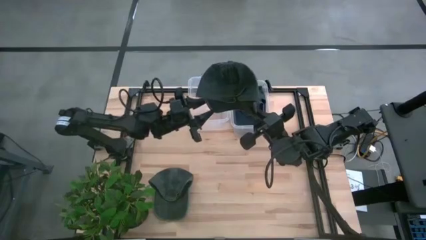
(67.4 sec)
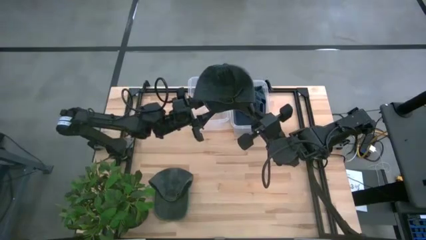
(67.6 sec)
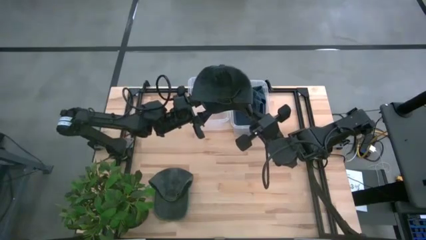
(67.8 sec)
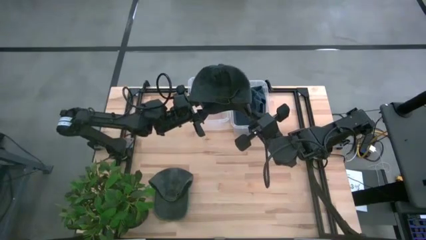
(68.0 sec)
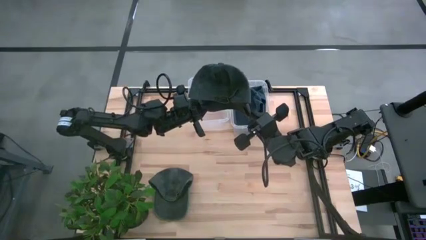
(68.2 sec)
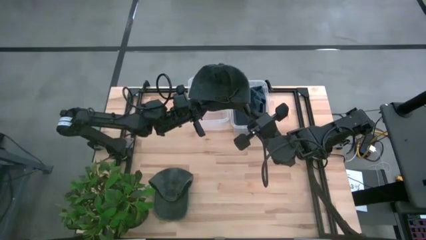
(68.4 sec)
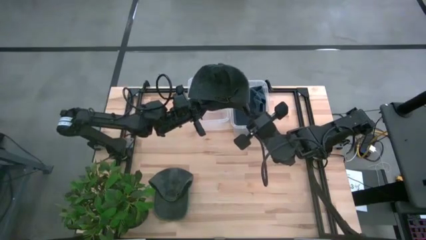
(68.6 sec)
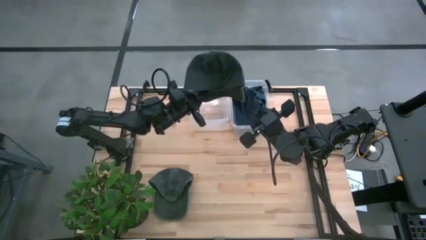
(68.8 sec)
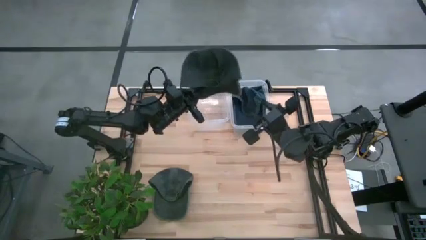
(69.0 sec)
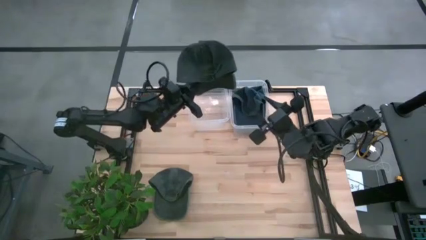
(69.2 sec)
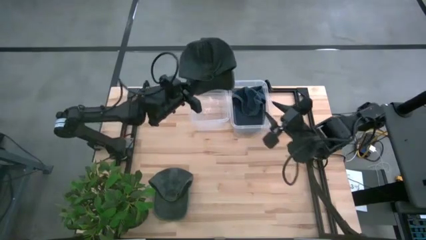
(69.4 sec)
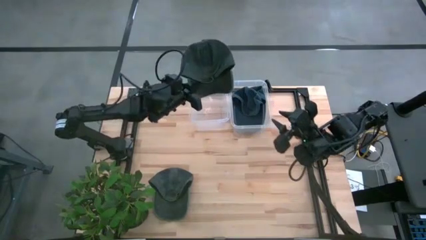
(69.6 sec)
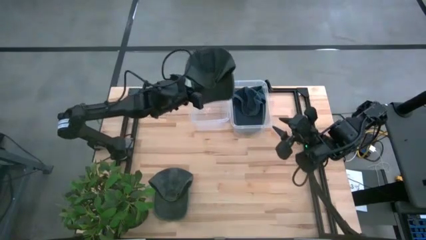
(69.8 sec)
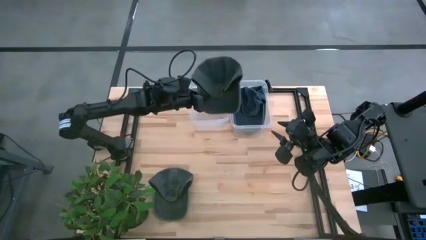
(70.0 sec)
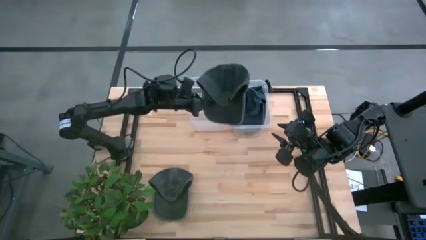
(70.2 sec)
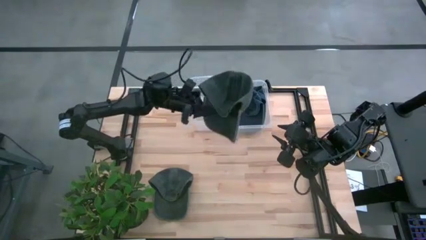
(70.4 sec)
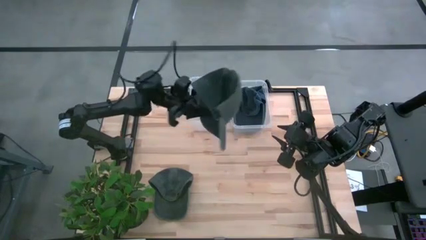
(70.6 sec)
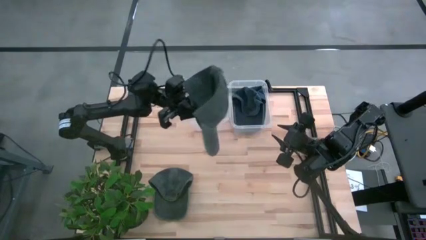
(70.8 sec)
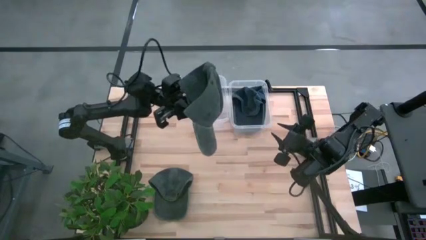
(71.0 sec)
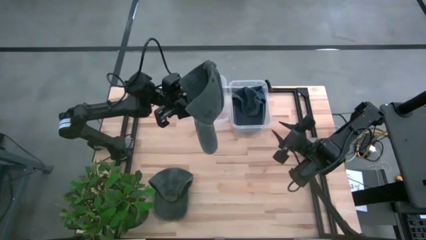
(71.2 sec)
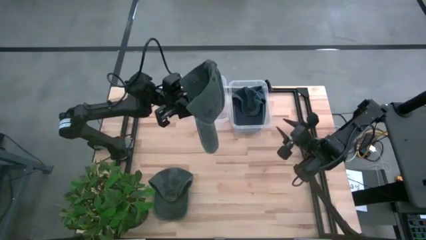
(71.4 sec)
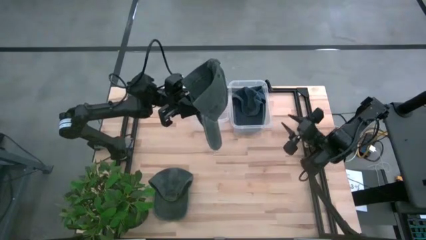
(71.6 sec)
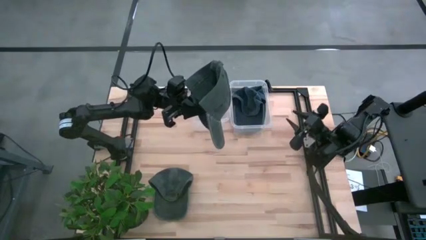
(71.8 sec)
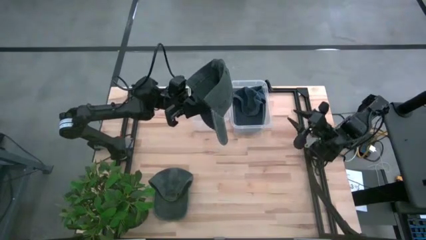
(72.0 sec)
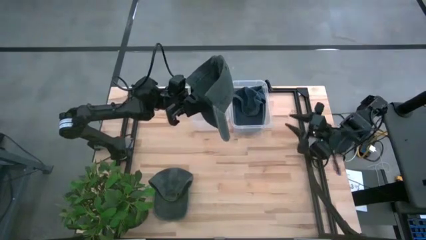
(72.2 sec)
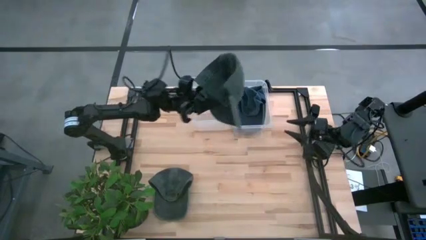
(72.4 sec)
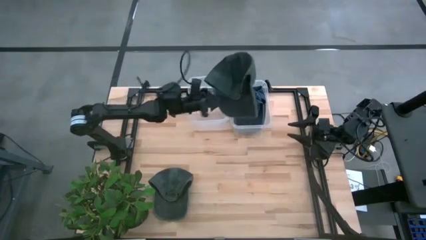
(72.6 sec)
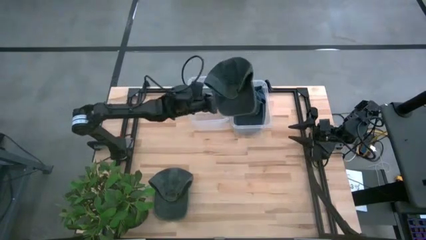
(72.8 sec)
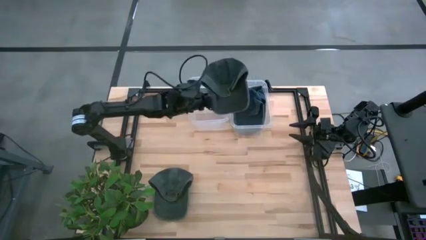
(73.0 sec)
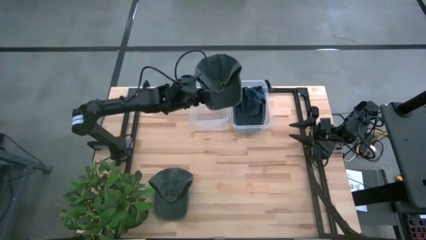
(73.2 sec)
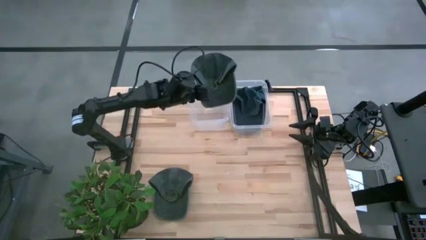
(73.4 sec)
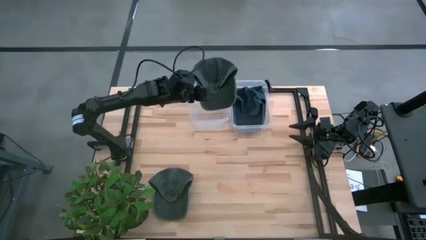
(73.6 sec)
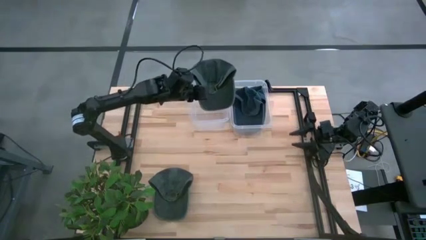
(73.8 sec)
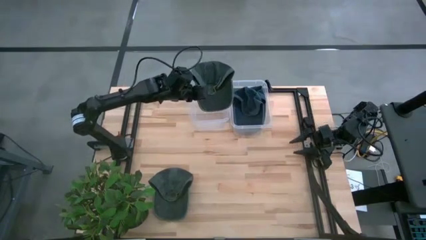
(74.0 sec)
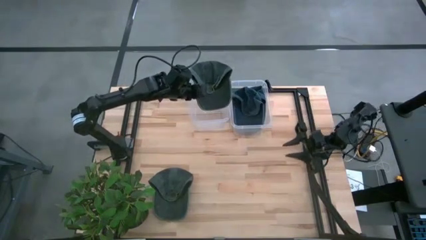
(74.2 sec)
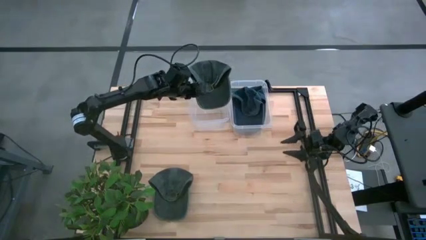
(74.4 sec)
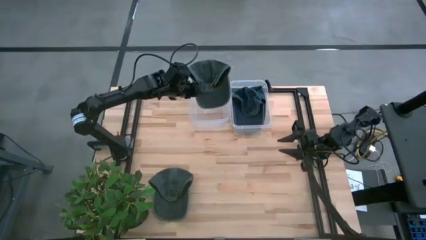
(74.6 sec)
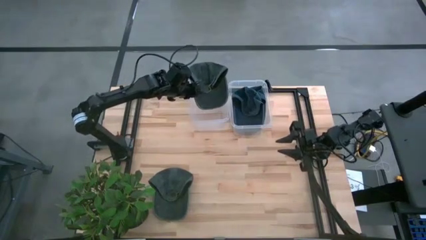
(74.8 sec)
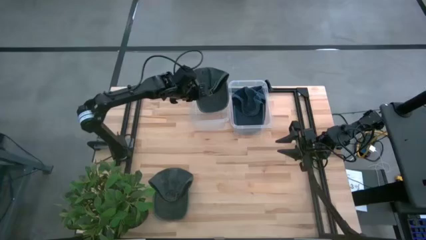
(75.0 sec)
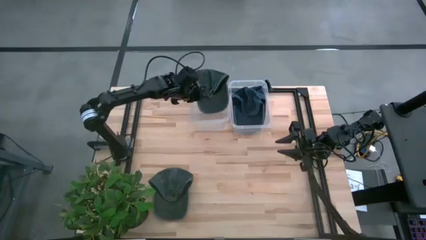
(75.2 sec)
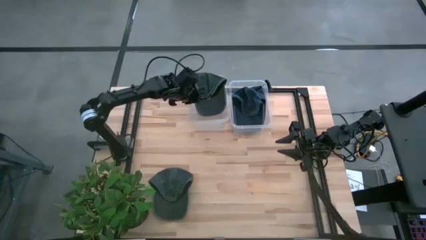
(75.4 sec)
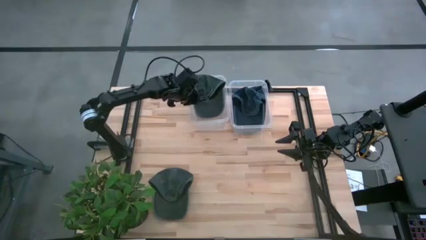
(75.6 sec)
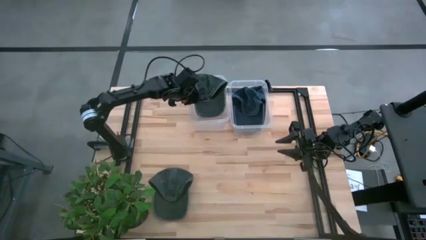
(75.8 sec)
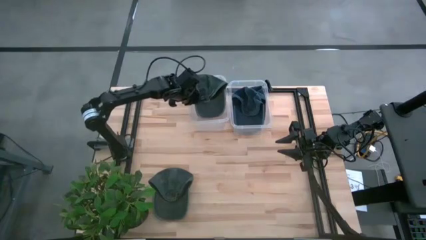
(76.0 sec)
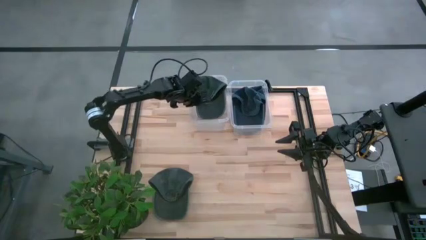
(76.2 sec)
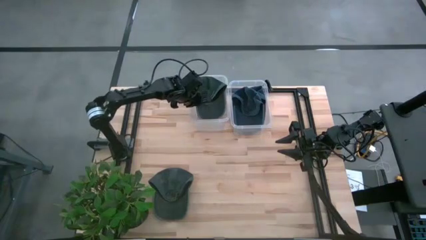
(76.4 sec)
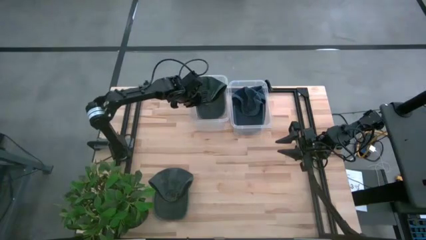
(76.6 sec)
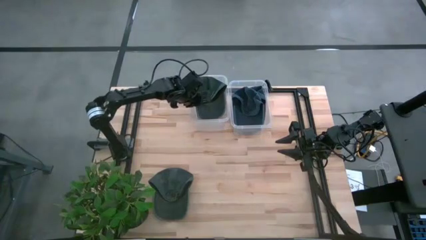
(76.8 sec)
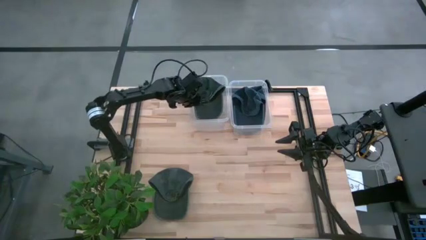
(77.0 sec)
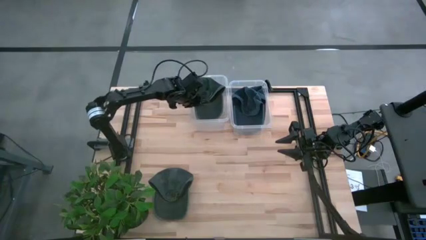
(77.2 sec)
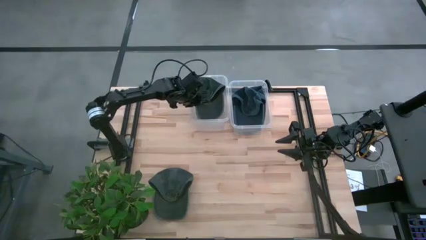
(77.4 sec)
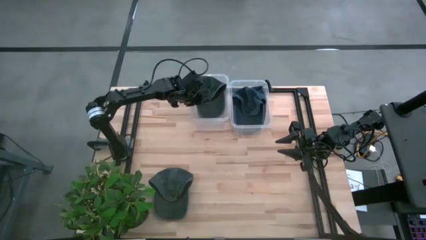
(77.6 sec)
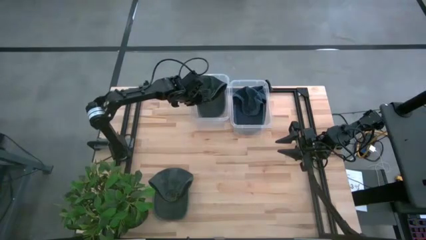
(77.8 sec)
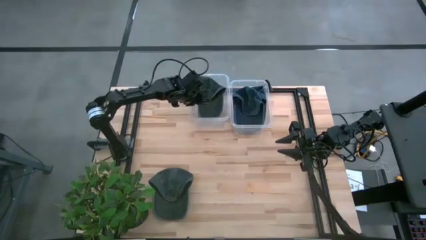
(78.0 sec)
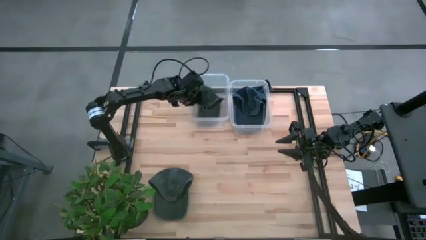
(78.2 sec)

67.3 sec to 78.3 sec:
Task: Pick & Place hat
Put the right dark gray cap into the left transparent bin
